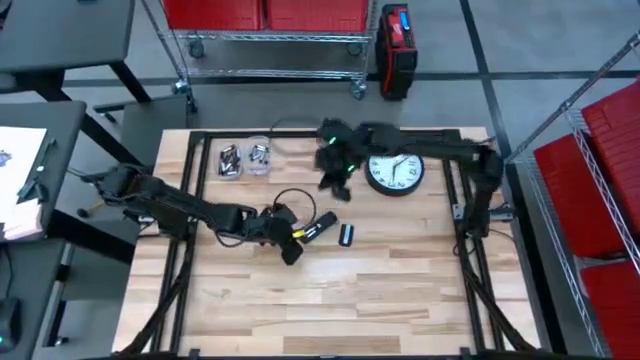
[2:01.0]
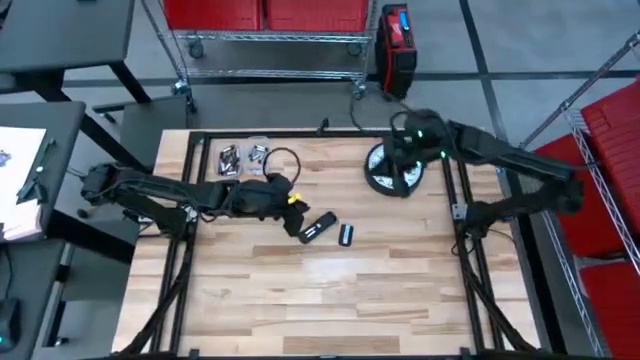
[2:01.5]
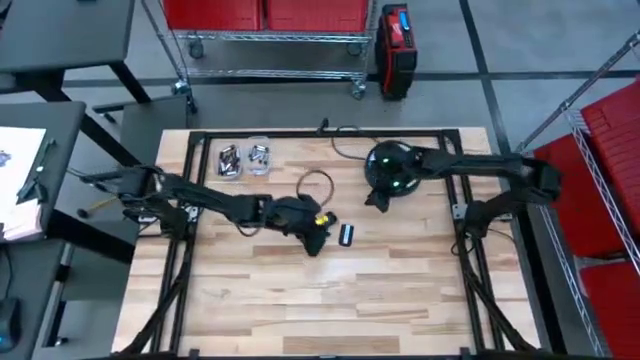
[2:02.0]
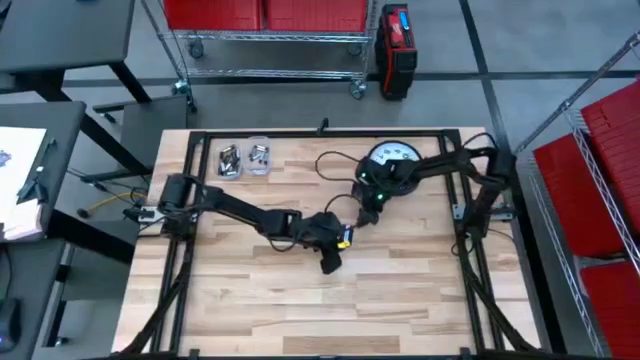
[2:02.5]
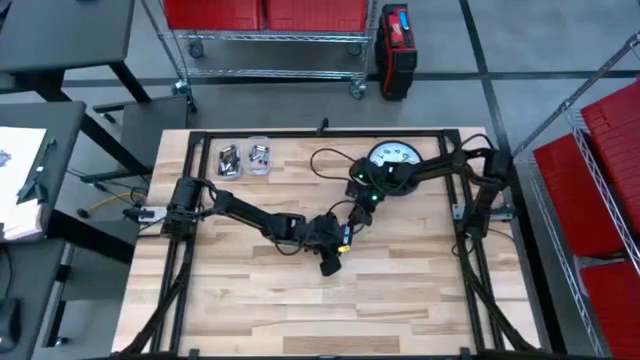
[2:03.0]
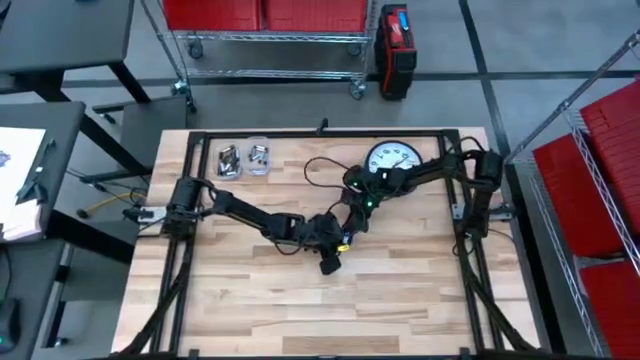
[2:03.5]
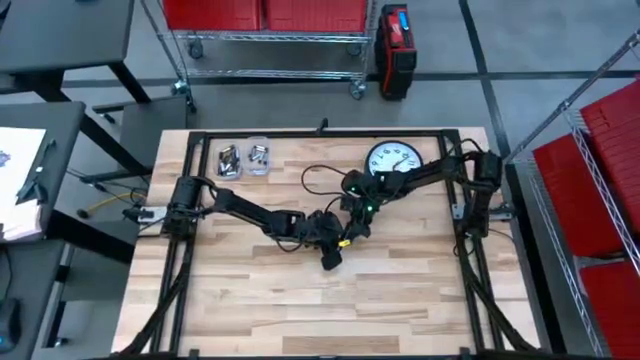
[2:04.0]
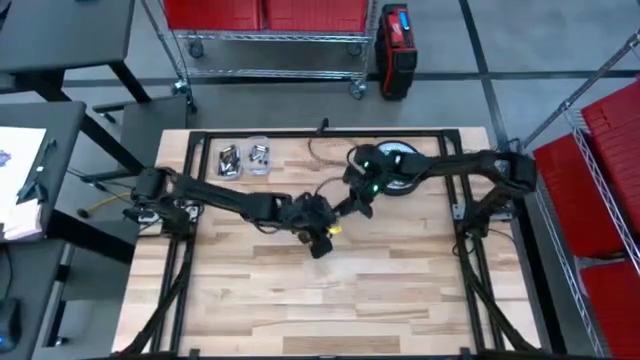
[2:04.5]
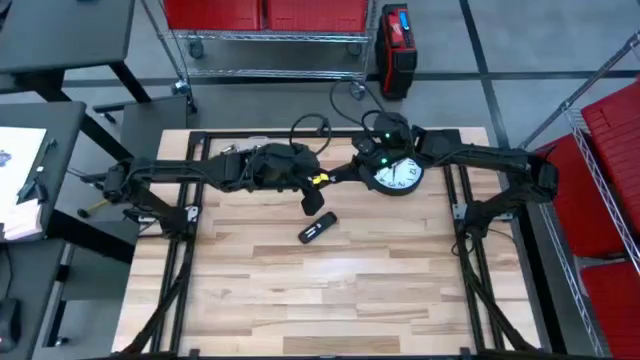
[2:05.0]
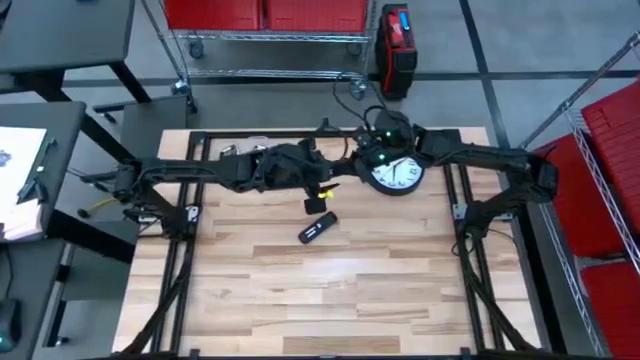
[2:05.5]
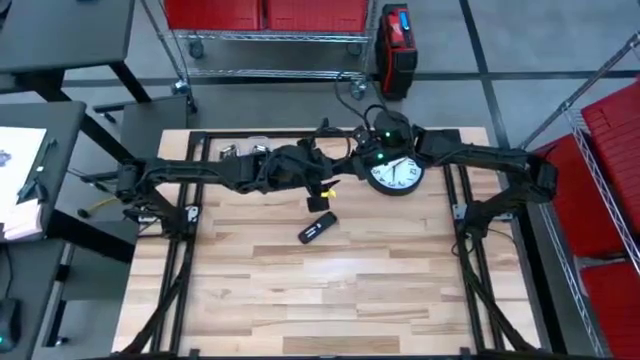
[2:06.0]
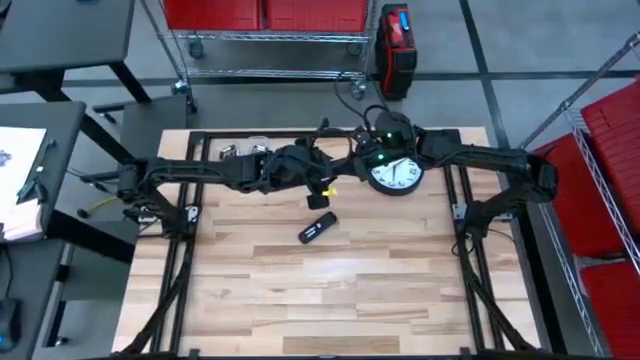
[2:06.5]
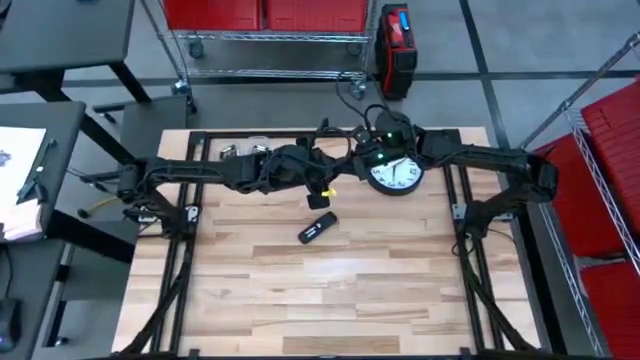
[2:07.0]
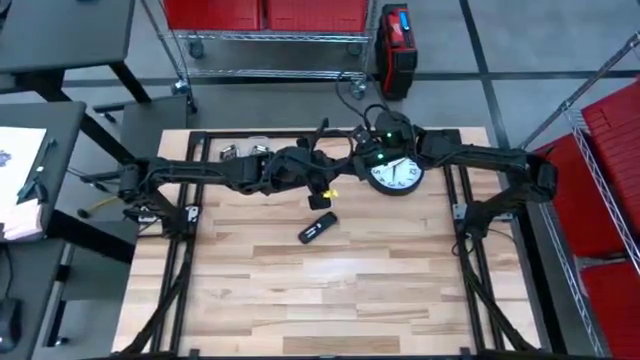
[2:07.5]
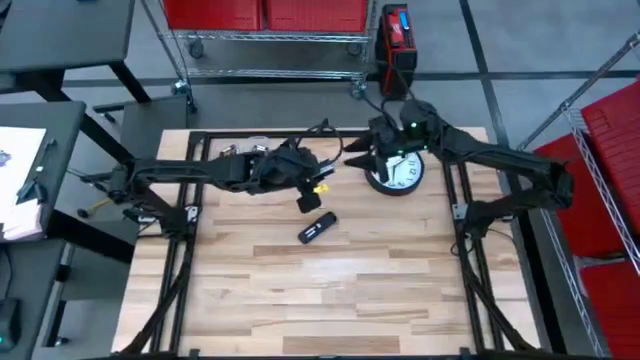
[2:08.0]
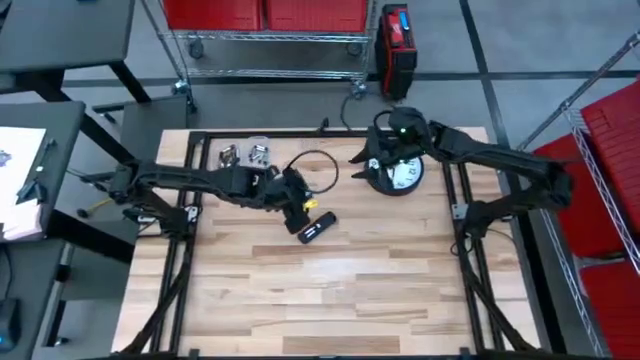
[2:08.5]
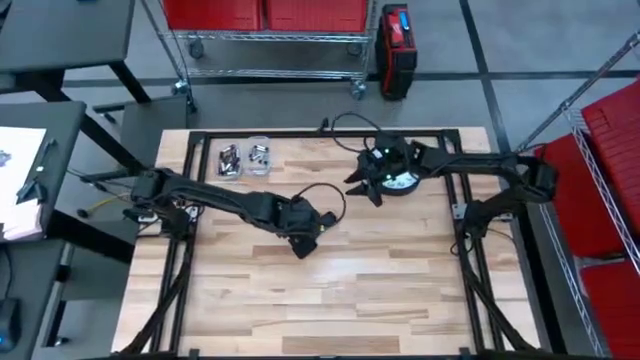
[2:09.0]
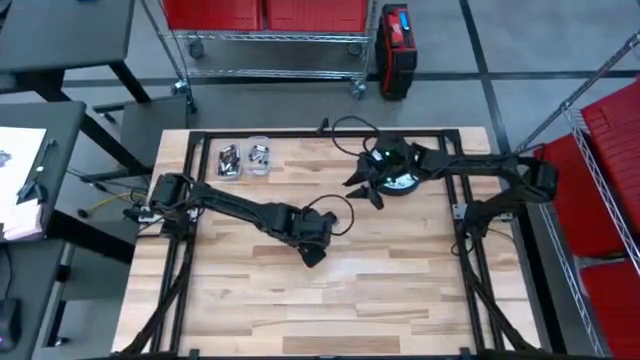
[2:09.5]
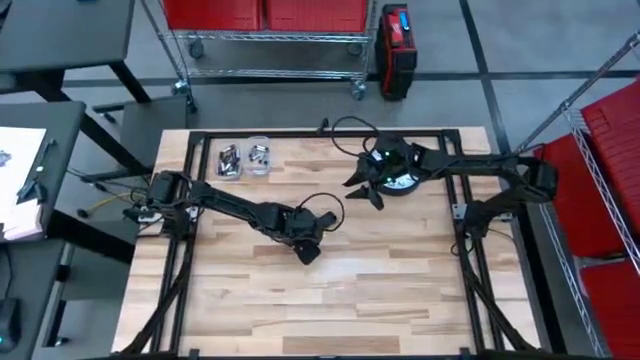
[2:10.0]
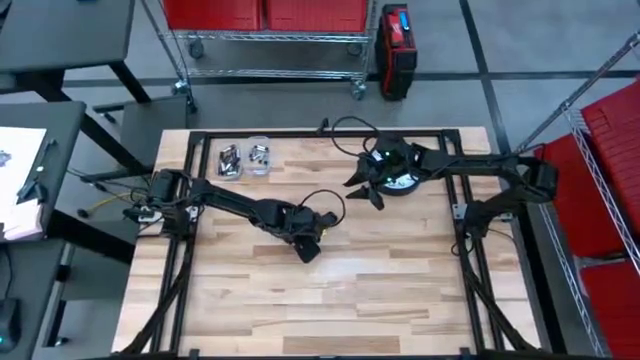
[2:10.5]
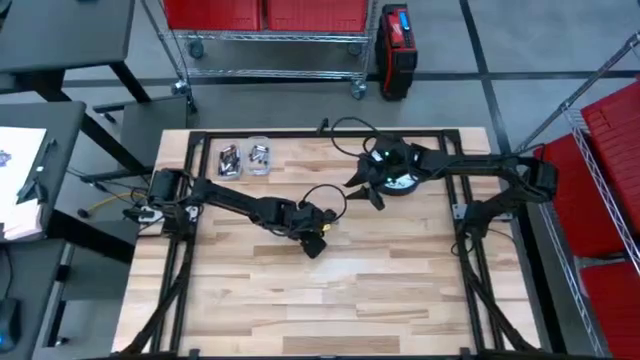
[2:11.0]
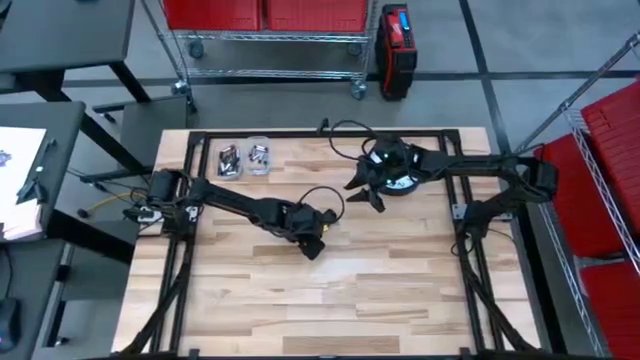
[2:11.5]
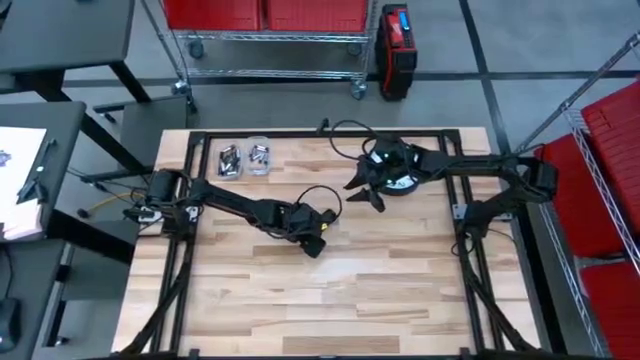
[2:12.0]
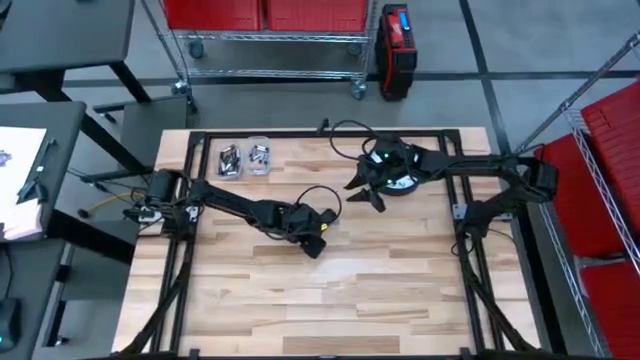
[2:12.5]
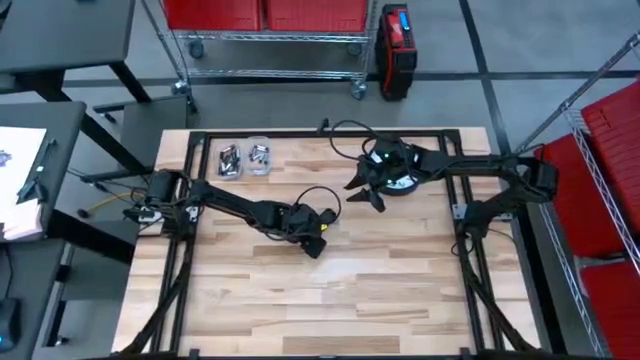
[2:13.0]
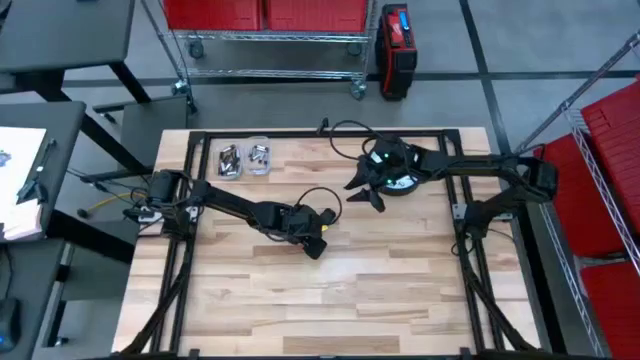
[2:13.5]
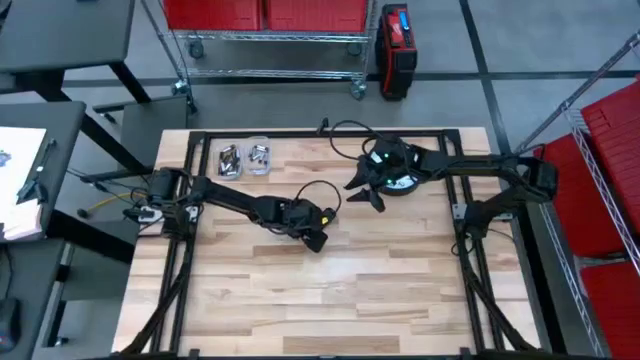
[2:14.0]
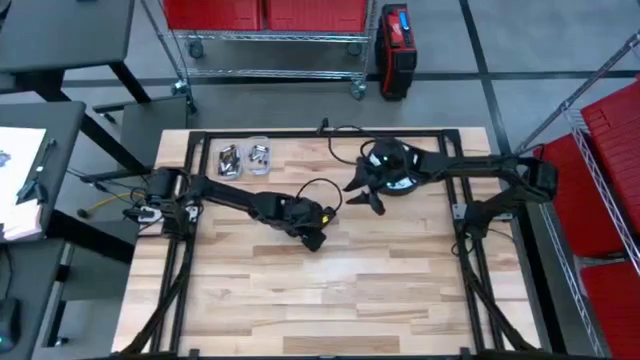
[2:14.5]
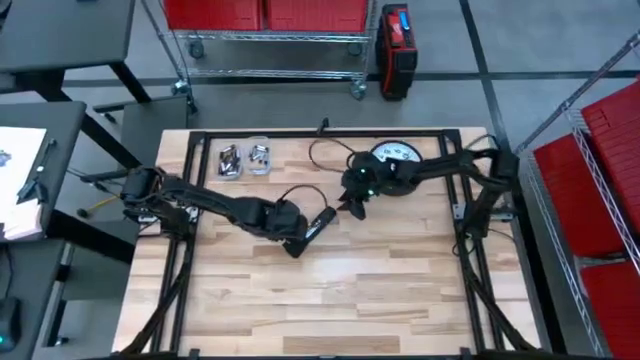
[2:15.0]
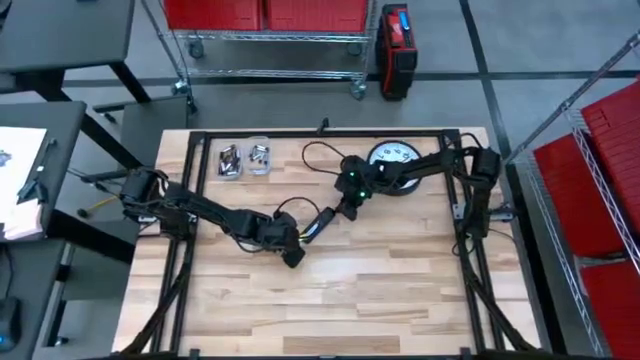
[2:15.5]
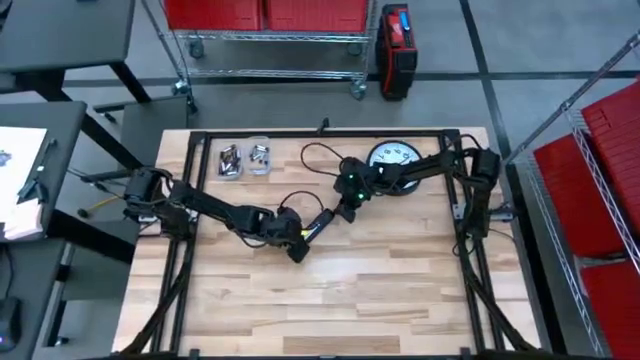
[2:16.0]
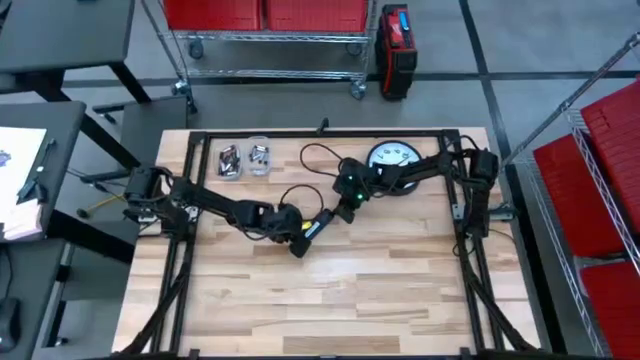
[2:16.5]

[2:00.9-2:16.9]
Task: Insert battery
Close the remote battery compartment

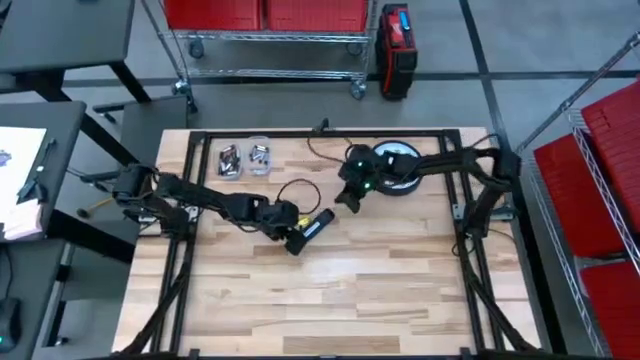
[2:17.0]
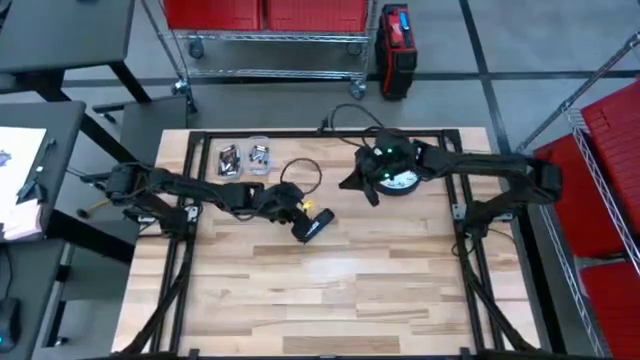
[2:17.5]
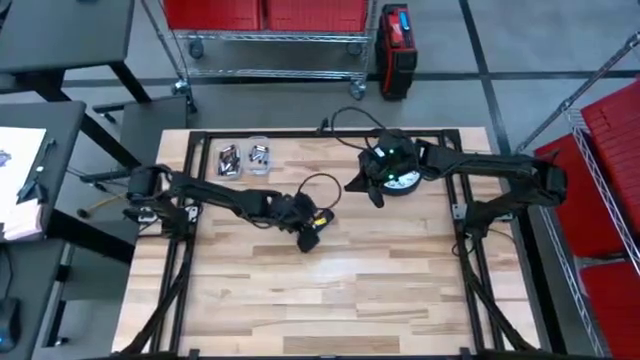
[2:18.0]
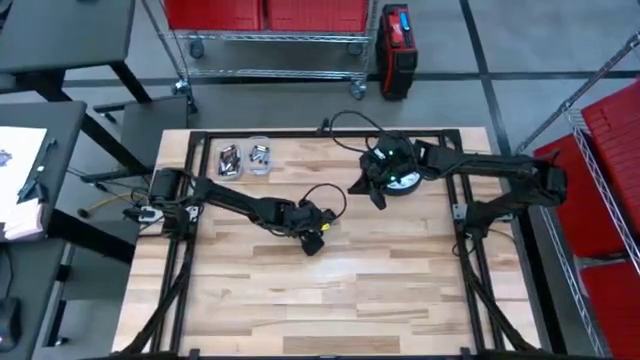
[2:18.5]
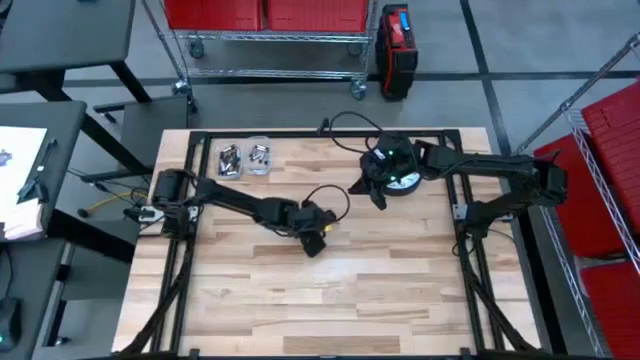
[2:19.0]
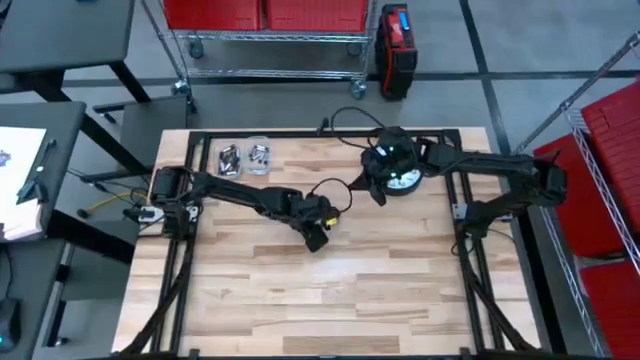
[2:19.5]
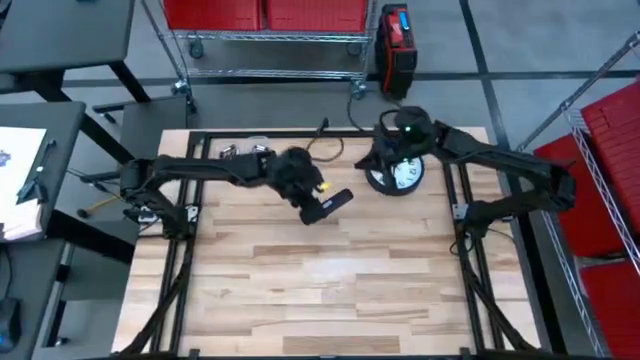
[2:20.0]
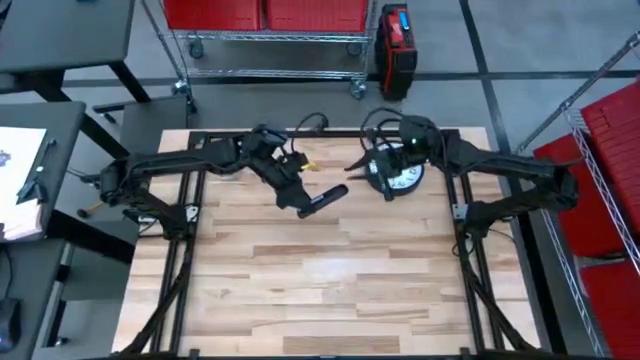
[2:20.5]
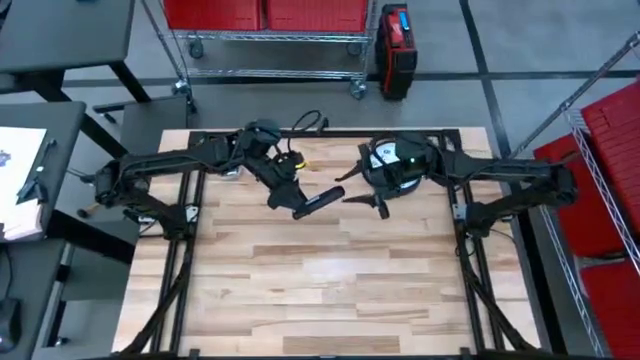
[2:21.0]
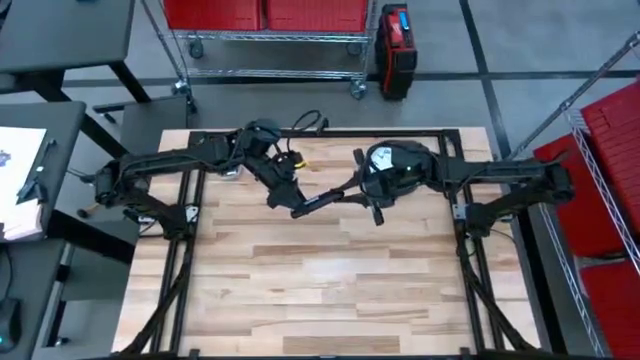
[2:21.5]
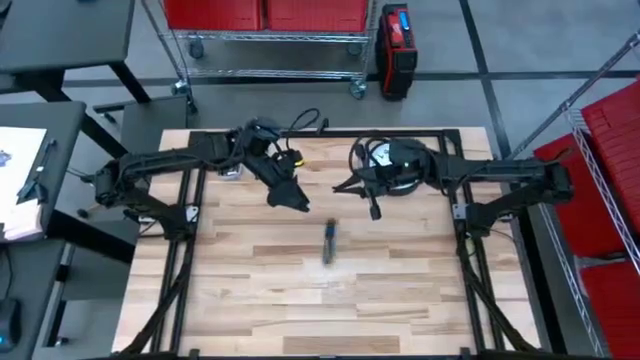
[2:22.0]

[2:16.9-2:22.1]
Move the remote to the top

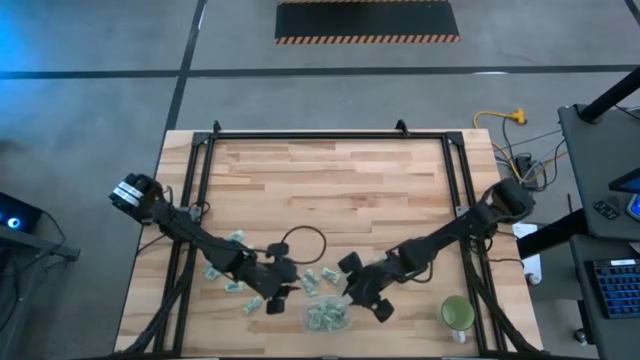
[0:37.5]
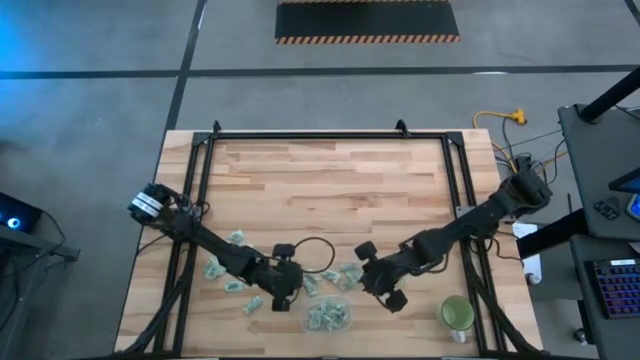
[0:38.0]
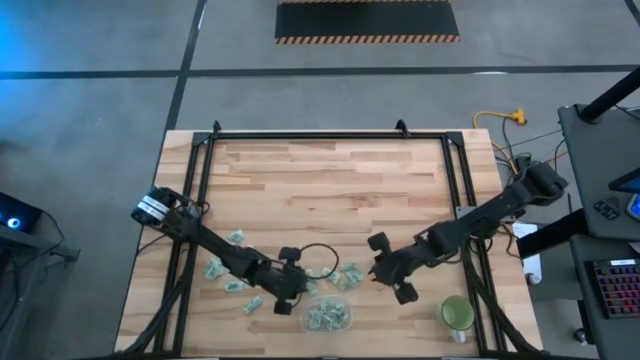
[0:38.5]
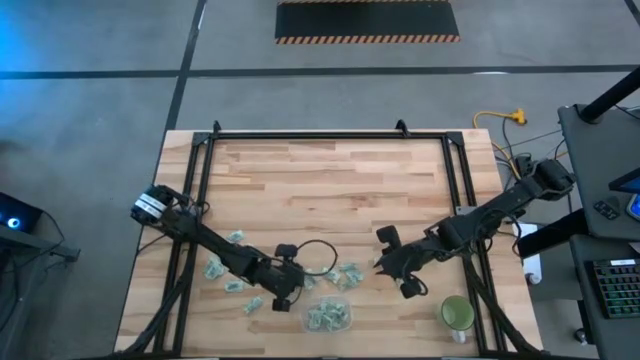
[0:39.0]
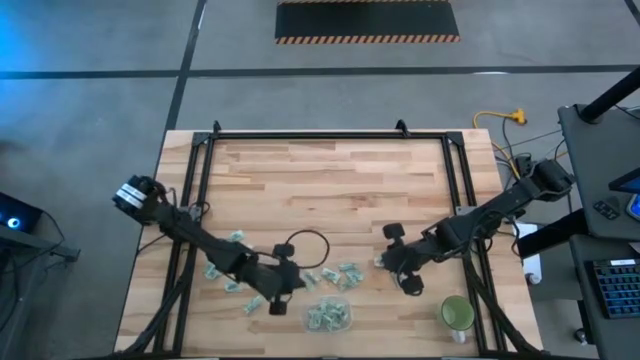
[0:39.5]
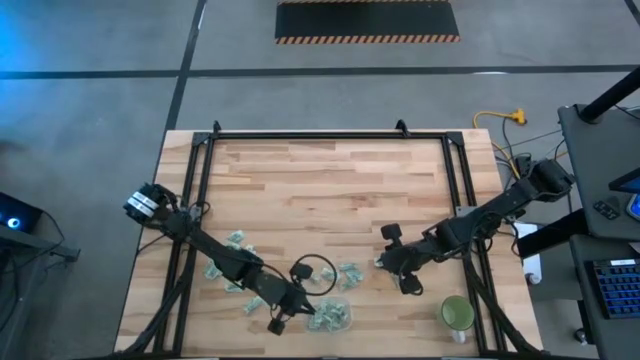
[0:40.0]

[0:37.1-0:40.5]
Task: Pick and place Stevia / Truvia into bins
Put the stevia packet into the transparent container
